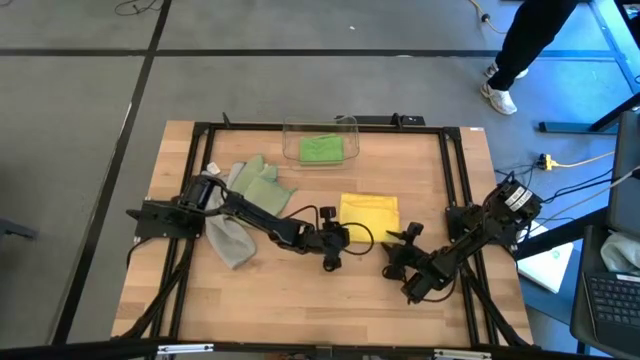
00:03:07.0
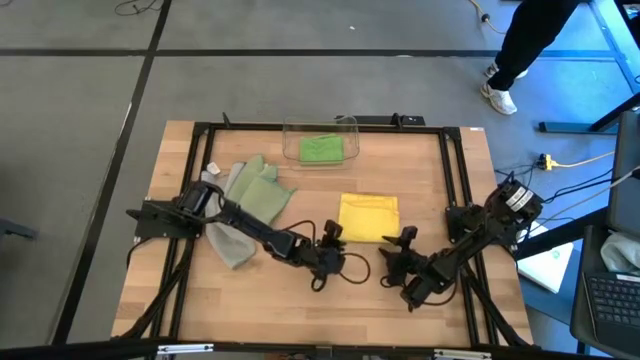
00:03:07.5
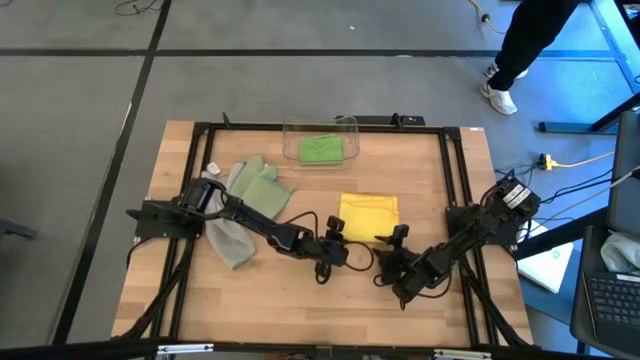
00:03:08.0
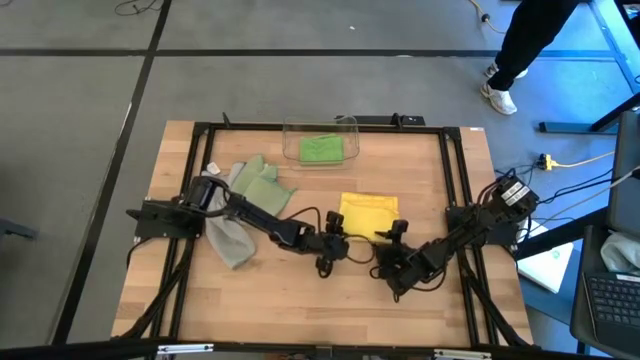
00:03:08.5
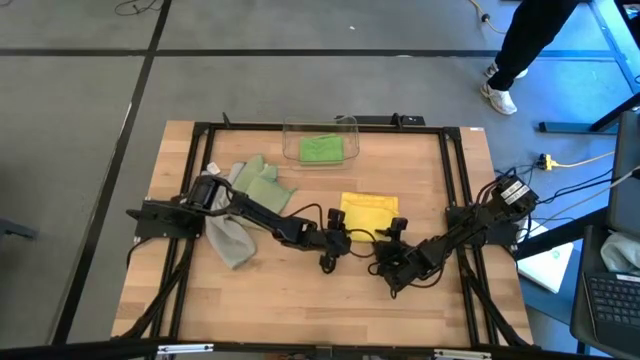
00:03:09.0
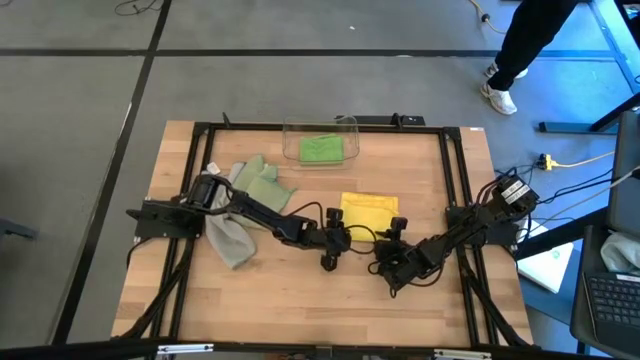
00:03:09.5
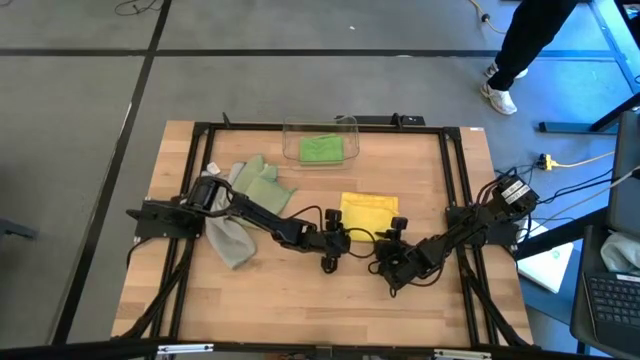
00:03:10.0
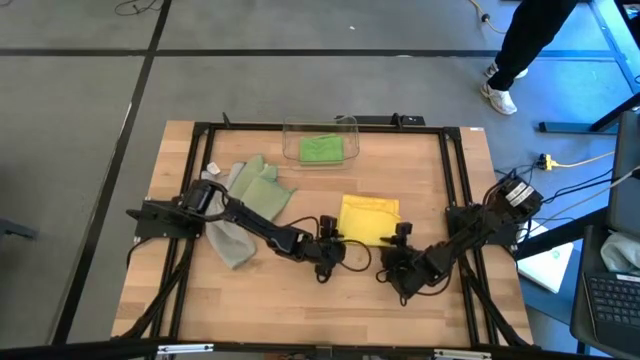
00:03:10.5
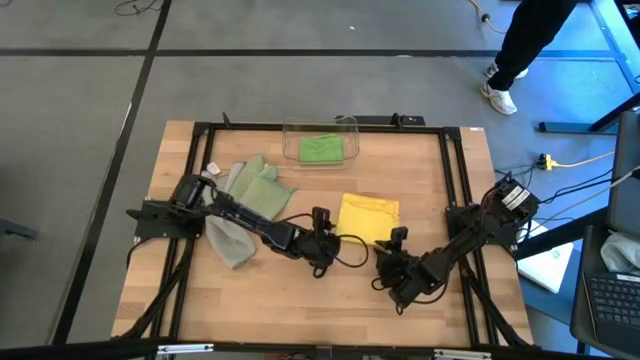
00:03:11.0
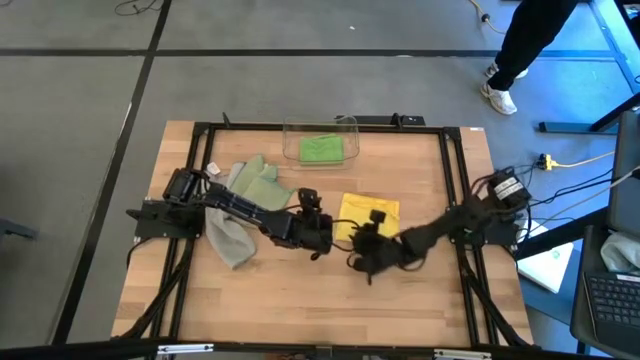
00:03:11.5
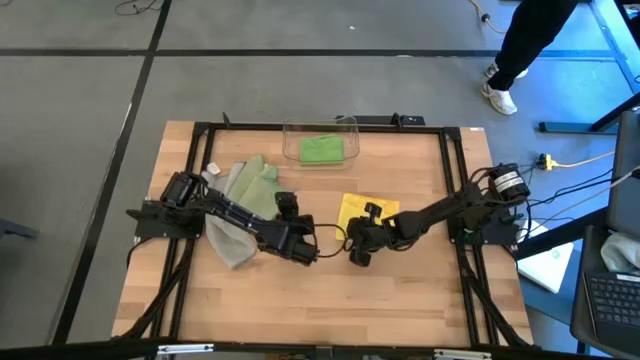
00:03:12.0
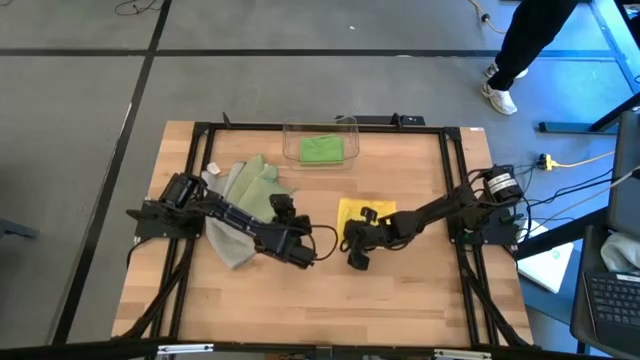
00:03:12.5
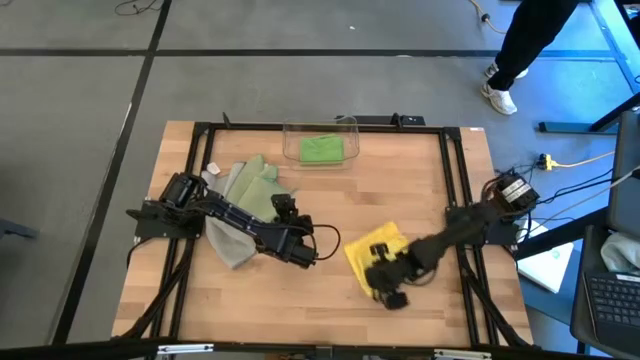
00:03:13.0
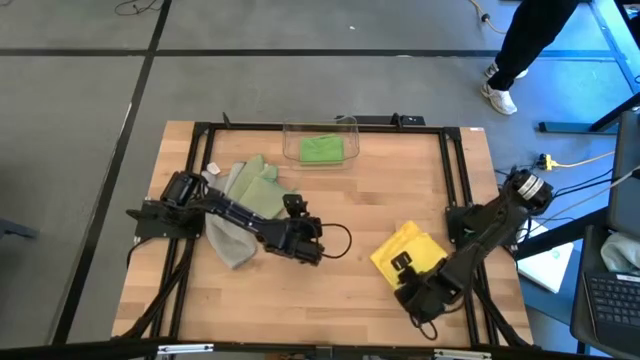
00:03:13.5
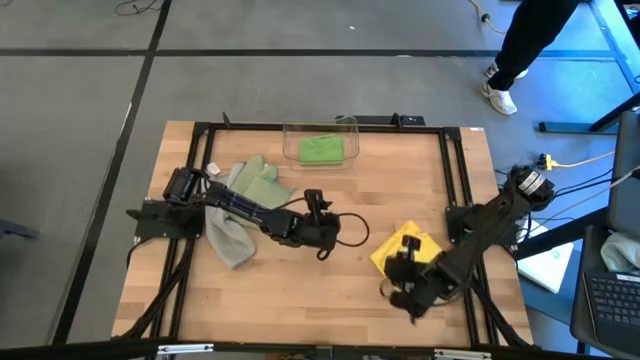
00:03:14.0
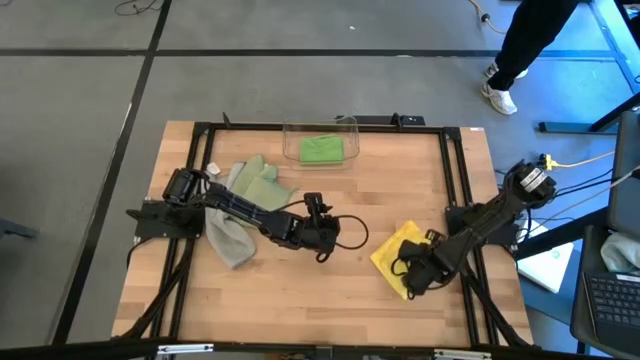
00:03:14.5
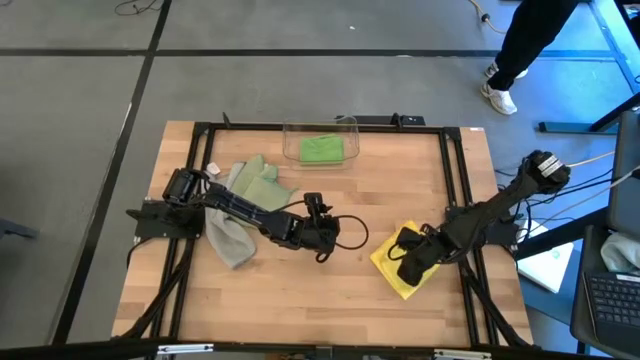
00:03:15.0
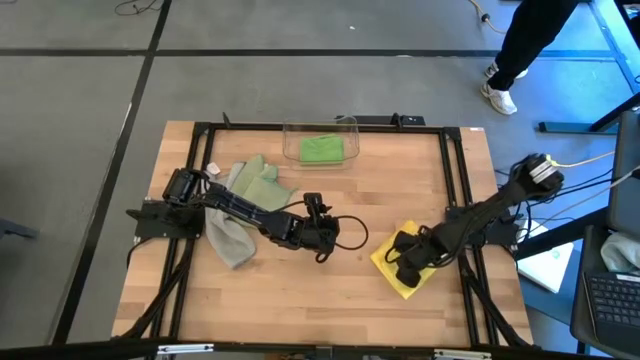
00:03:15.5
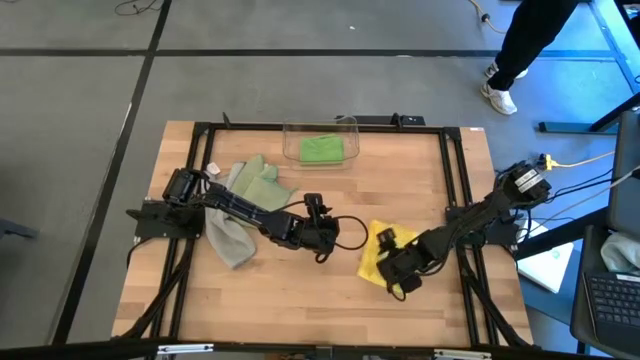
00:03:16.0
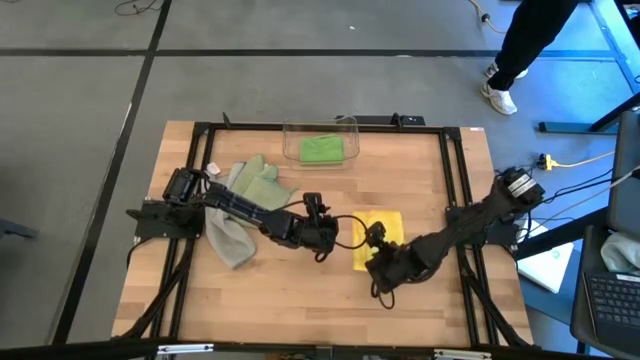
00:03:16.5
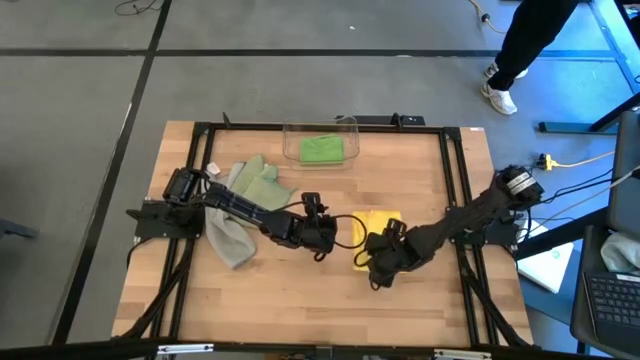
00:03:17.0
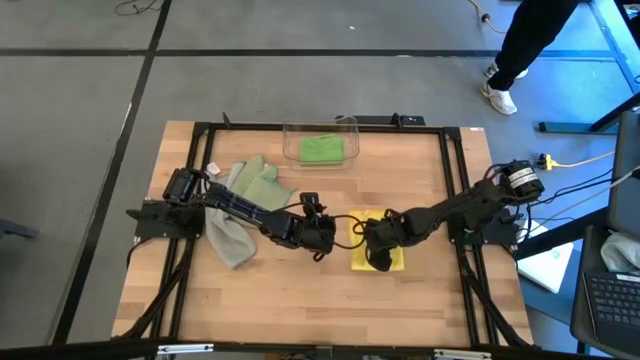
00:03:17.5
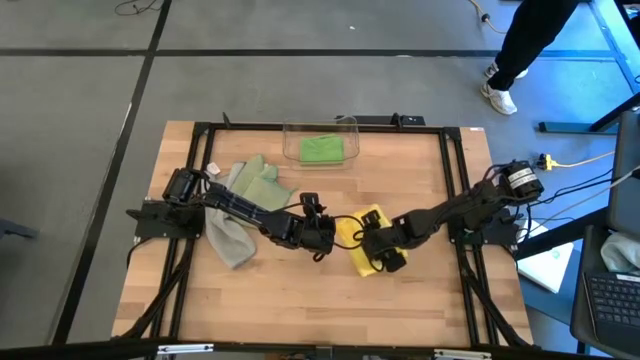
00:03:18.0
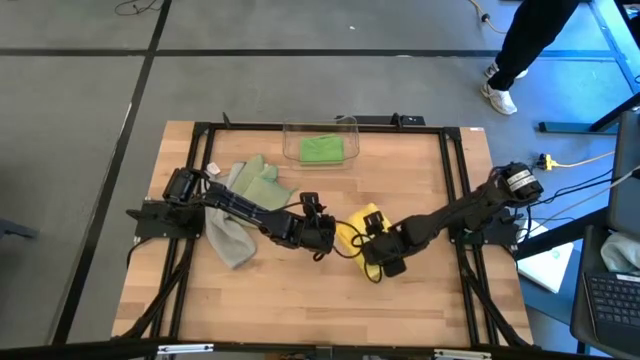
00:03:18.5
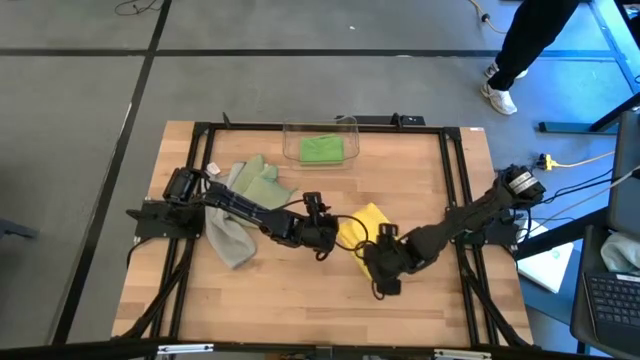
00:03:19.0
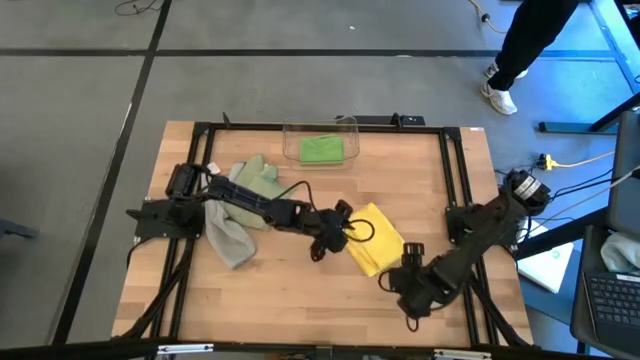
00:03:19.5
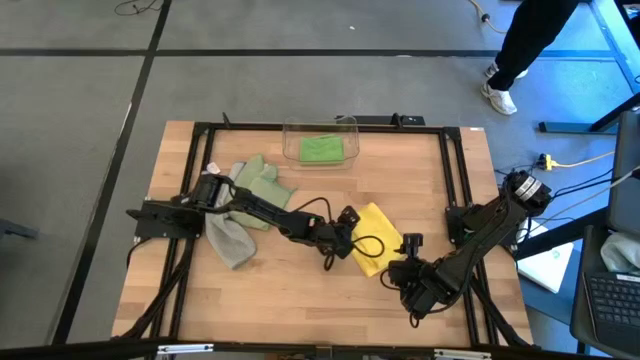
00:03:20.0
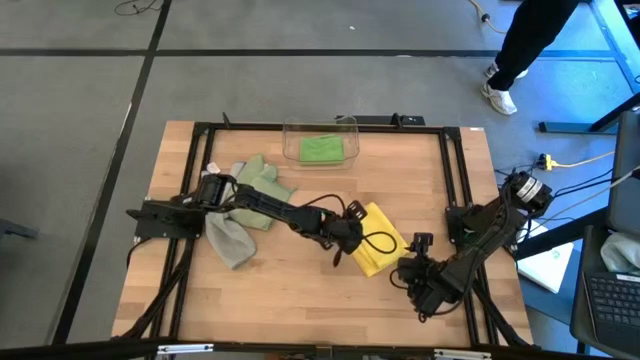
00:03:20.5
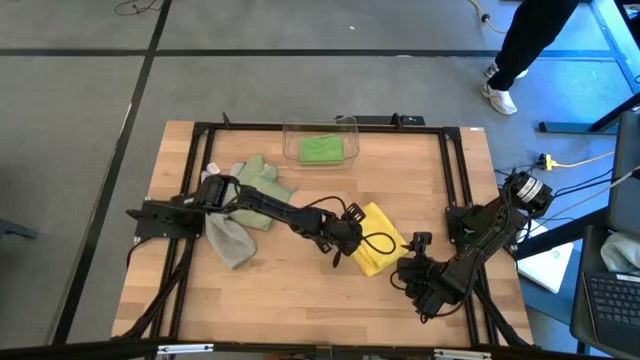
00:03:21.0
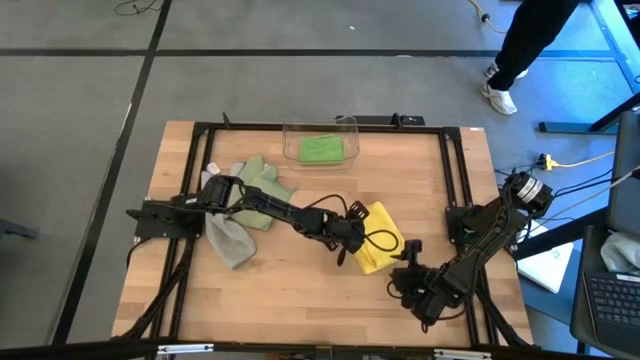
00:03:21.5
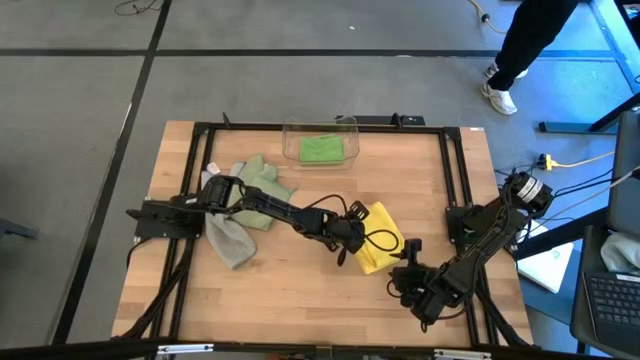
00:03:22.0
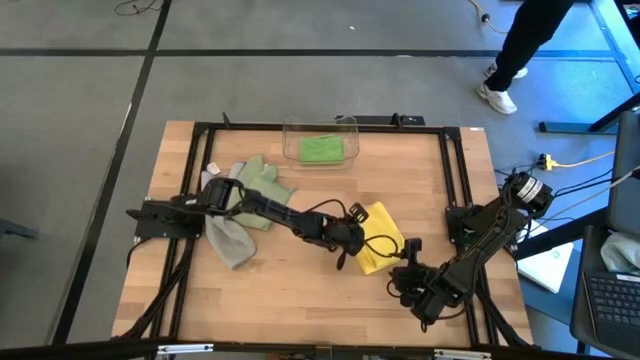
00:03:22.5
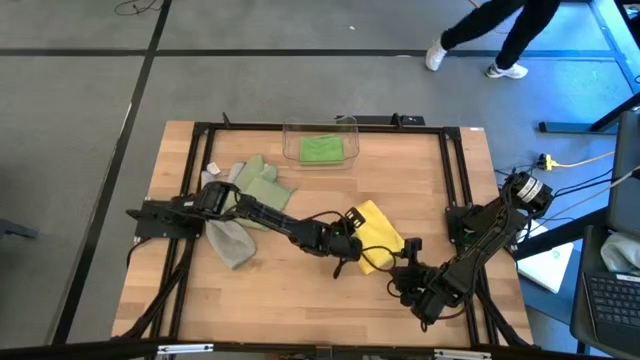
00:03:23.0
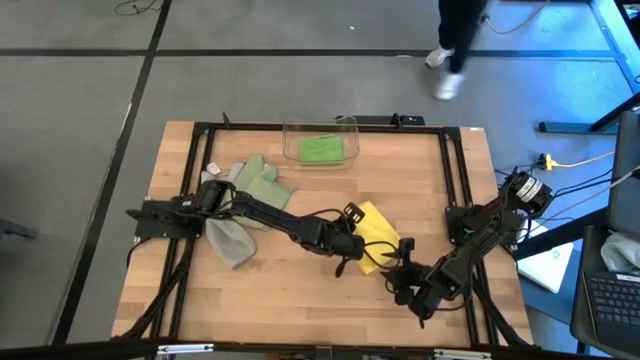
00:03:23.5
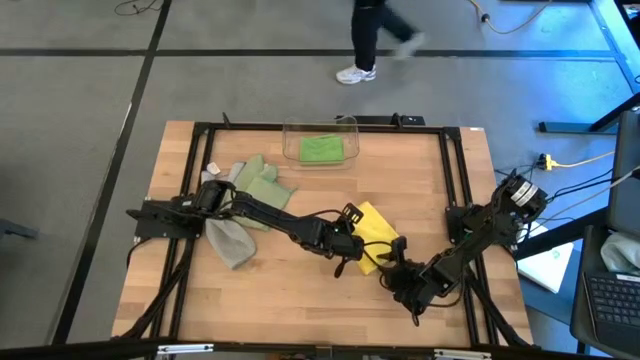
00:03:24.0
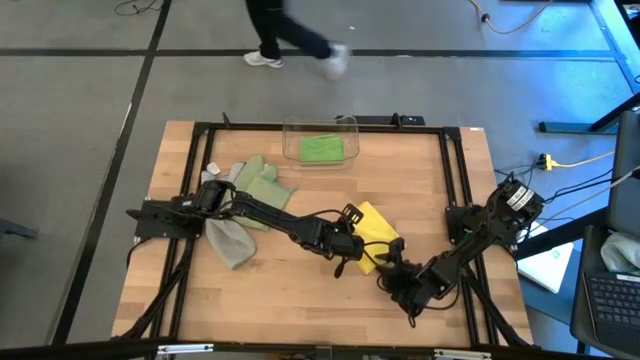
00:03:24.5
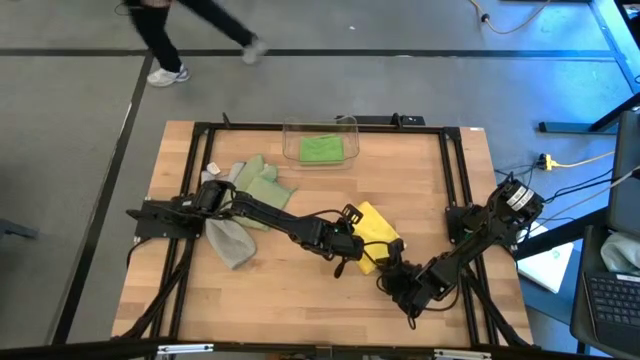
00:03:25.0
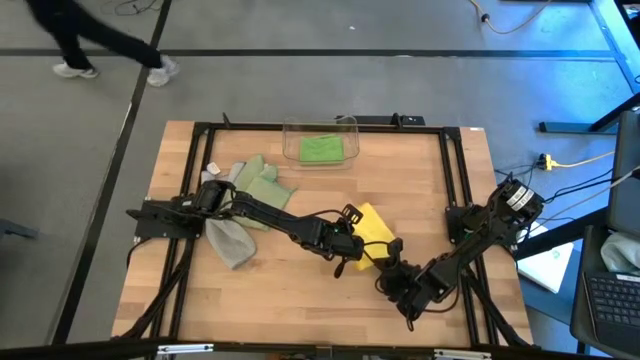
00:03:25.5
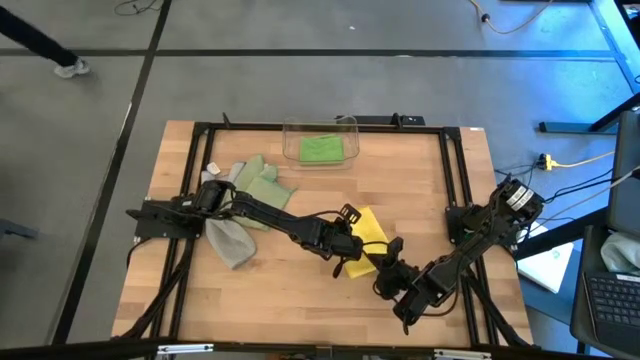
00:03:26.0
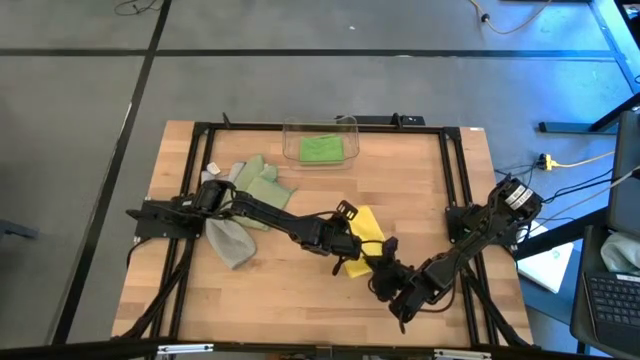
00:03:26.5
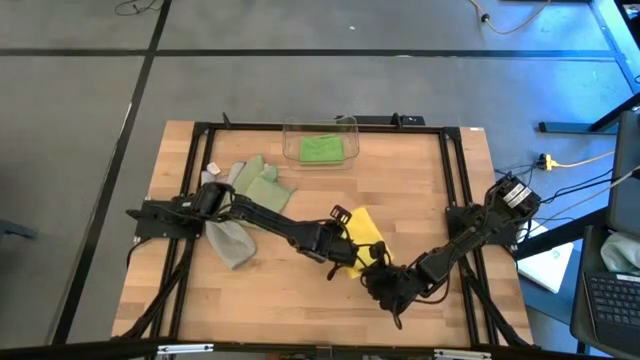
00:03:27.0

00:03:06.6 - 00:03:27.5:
Task: Fold microfiber towels
Fold the yellow microfiber cloth

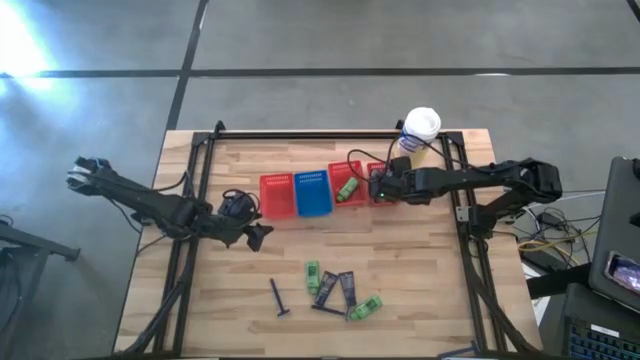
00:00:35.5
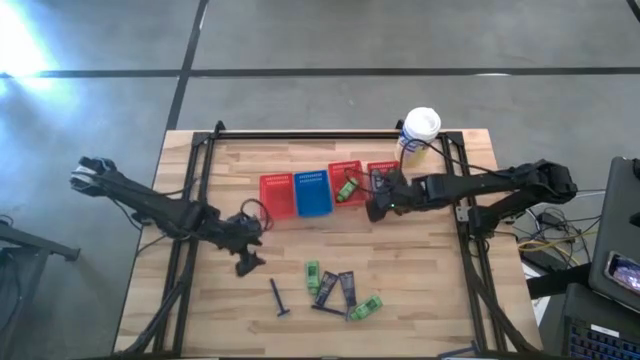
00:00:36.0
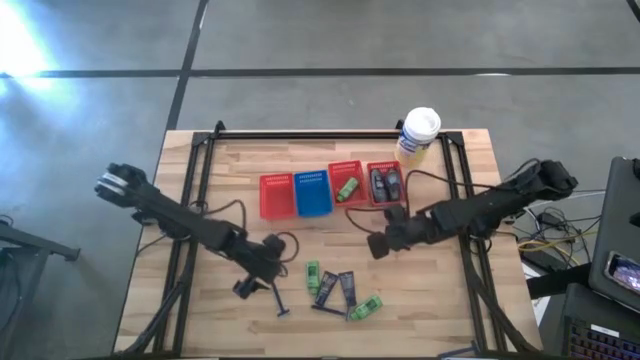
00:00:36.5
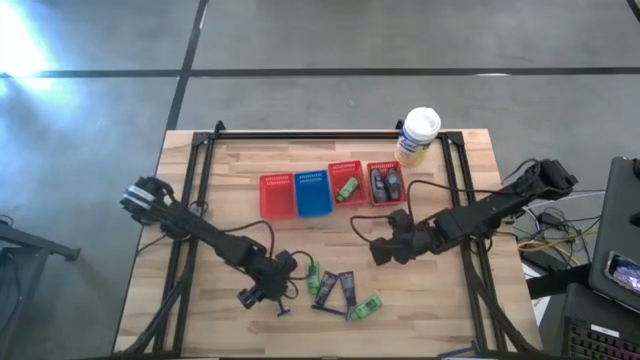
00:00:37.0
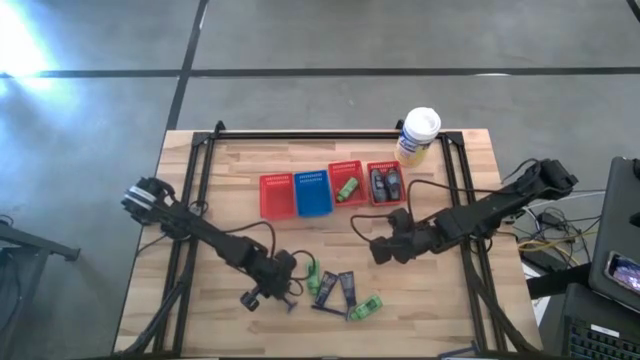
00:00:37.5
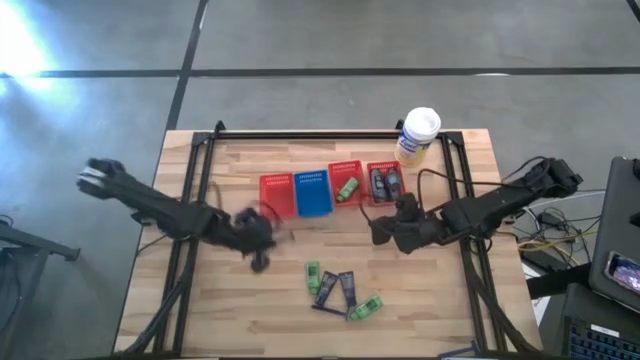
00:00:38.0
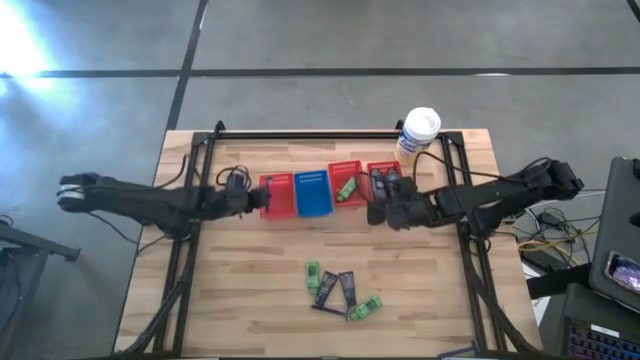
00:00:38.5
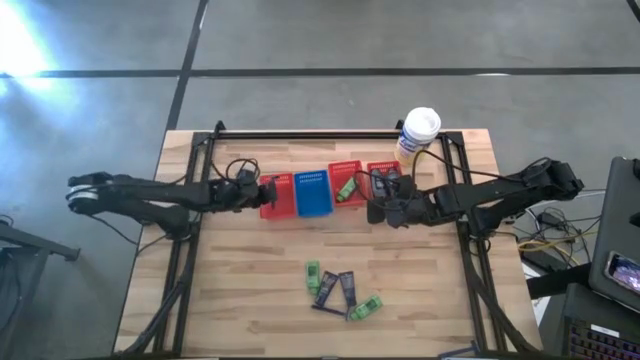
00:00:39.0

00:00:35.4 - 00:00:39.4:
Task: Pick & Place Travel size toiletries
Put the blue razor into the left red bin
